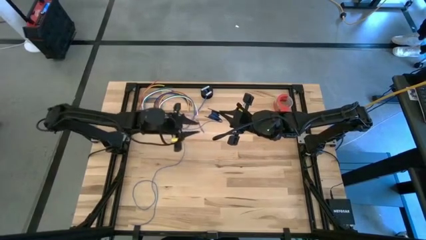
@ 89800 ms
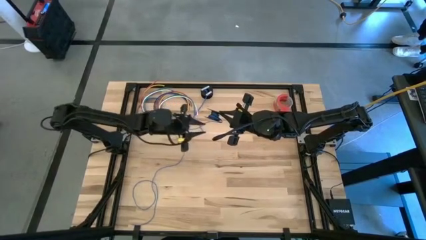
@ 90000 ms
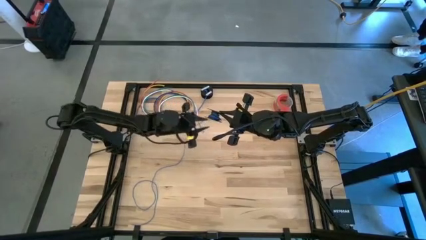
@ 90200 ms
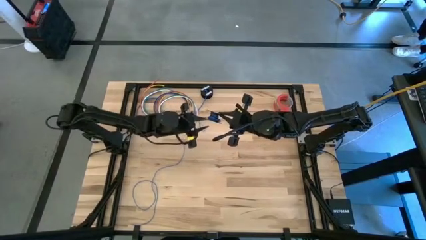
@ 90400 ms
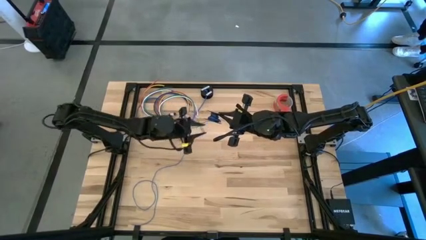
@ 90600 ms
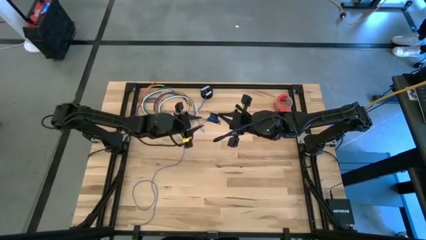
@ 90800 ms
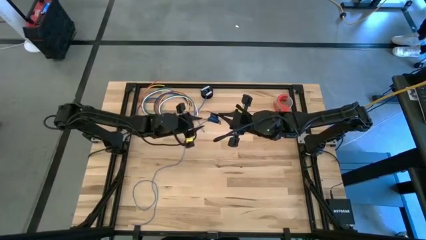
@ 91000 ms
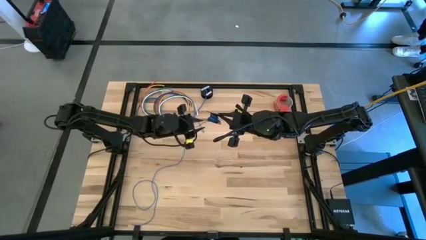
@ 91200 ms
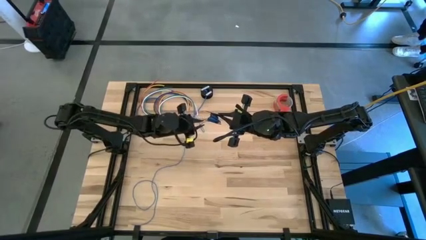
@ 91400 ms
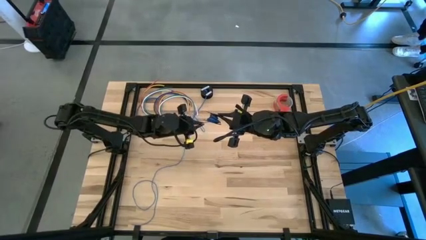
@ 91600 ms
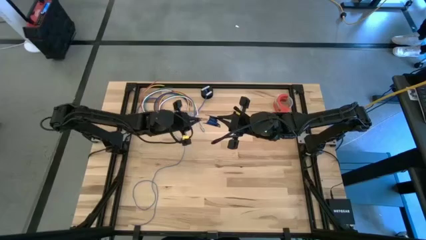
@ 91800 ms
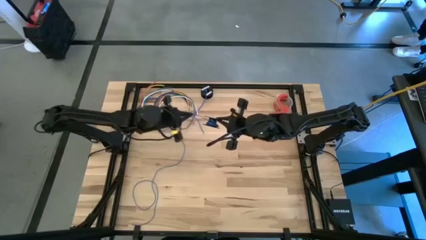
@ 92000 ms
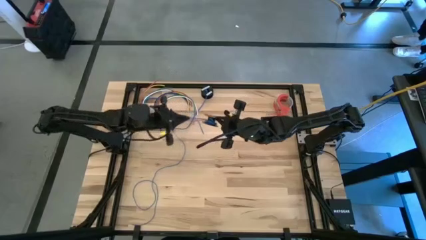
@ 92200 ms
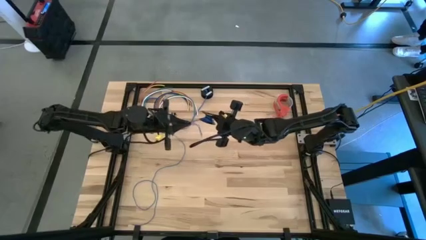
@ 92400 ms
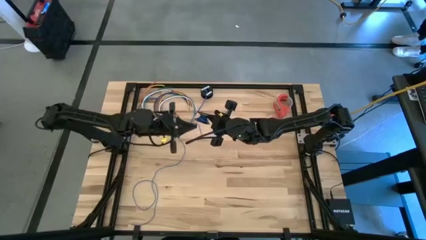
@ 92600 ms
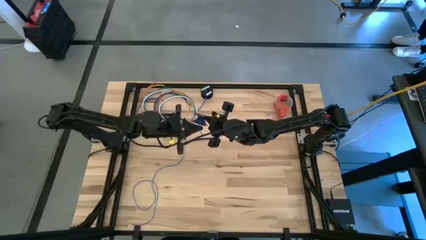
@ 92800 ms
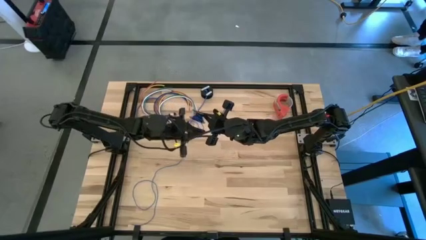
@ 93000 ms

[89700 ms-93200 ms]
Task: Coil cords
Coil the blue wire onto the spool

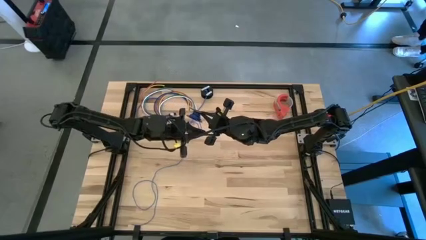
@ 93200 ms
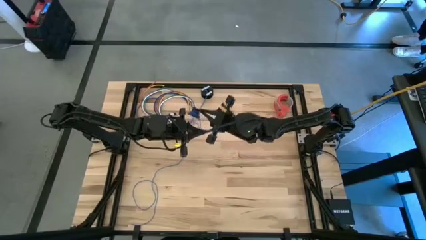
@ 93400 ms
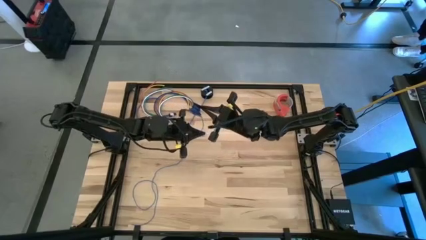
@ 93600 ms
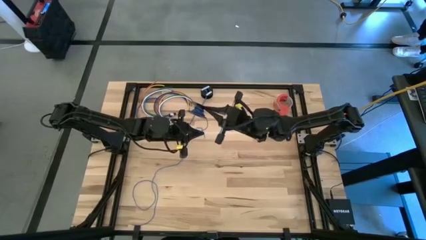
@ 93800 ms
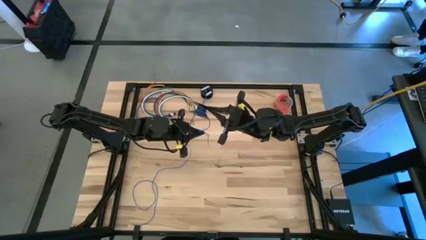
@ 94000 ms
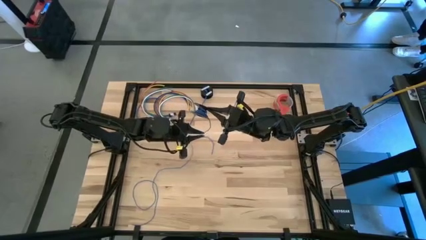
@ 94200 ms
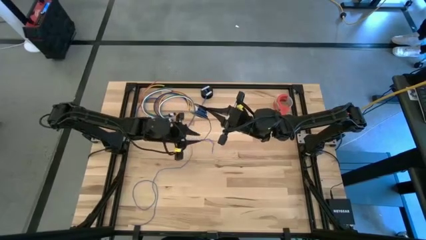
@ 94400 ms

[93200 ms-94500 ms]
Coil the blue wire onto the spool

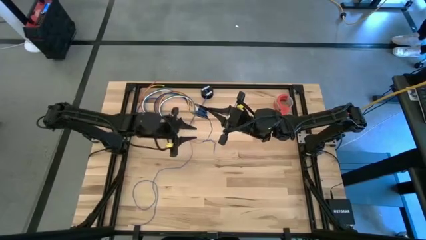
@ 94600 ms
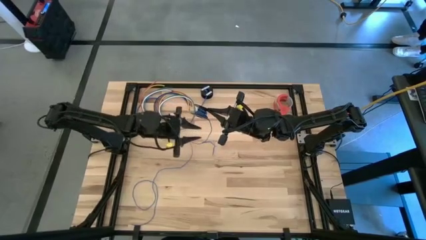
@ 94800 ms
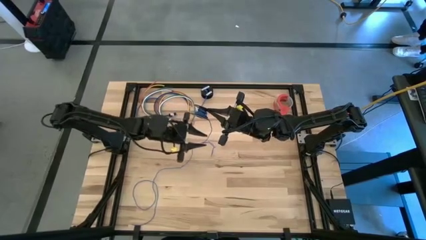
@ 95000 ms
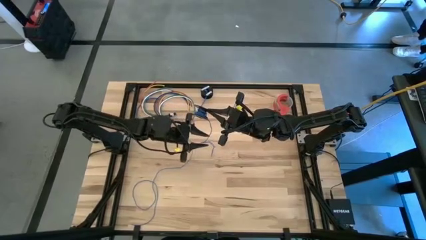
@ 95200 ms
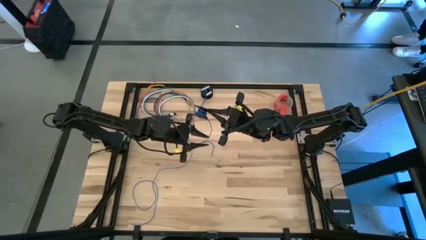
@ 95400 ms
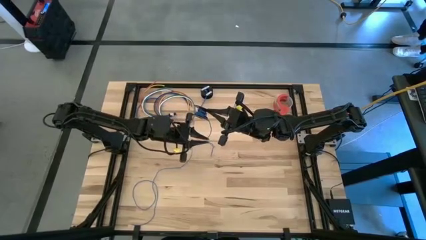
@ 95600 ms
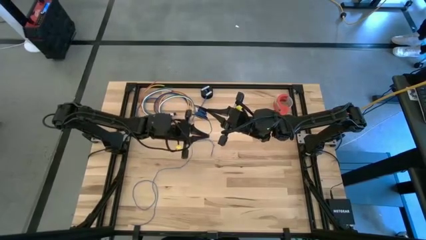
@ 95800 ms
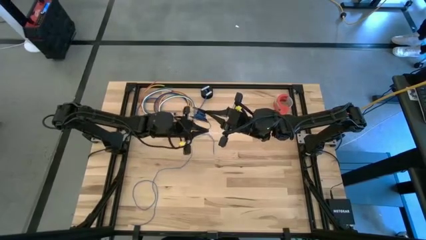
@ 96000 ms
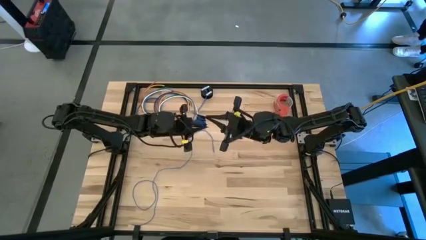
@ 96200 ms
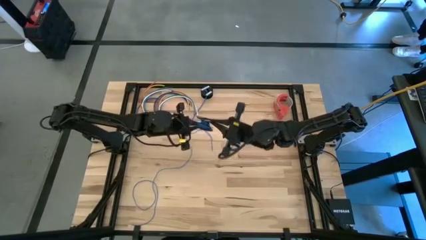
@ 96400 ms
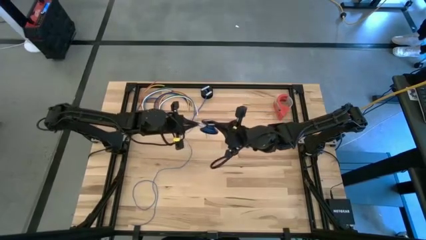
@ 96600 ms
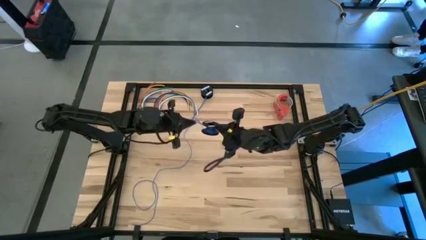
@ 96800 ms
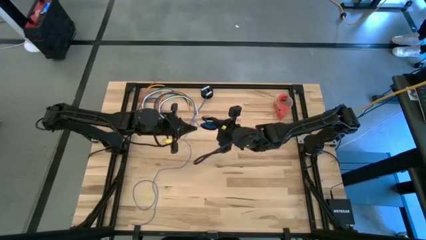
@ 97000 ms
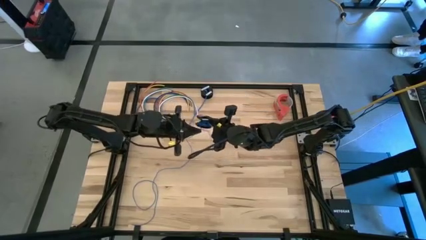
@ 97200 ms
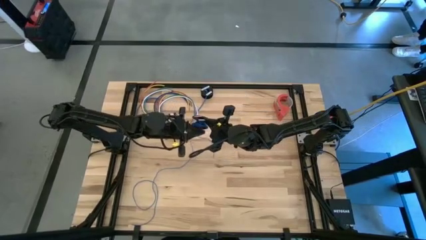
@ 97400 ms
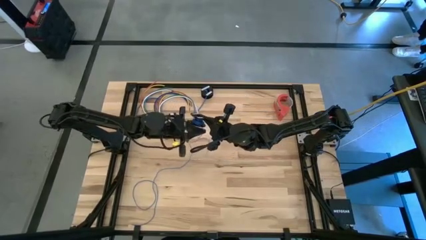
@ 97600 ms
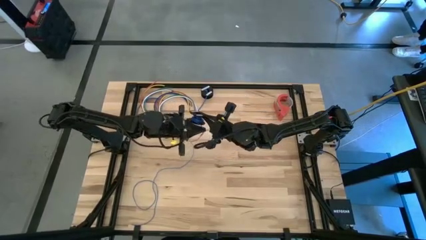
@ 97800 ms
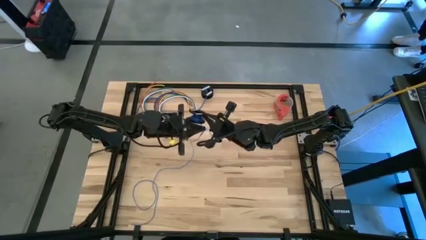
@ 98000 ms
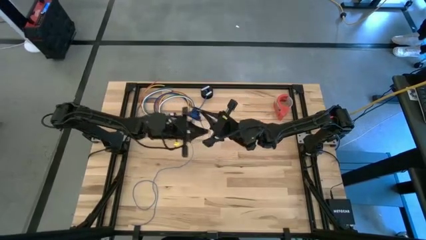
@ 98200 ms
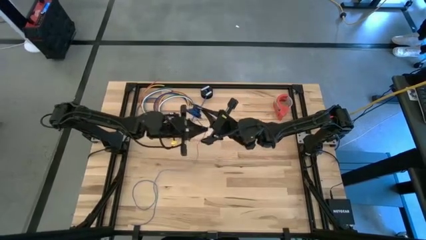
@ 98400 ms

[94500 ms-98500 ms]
Coil the blue wire onto the spool

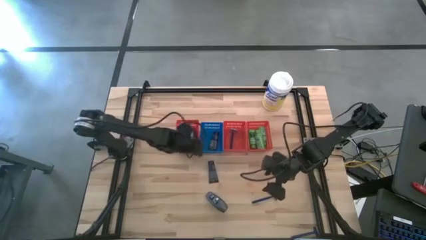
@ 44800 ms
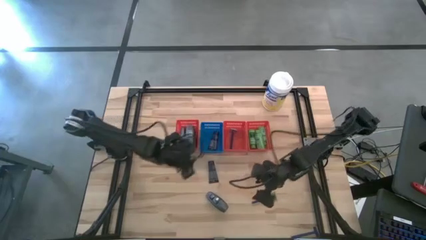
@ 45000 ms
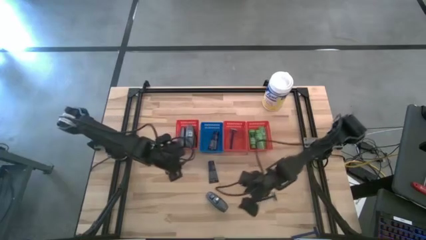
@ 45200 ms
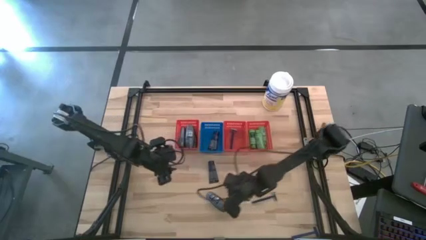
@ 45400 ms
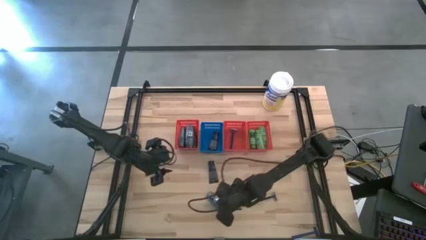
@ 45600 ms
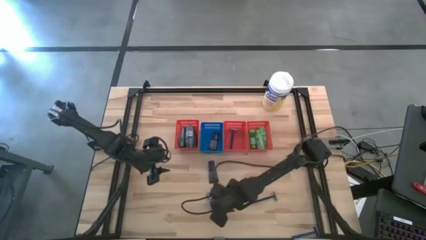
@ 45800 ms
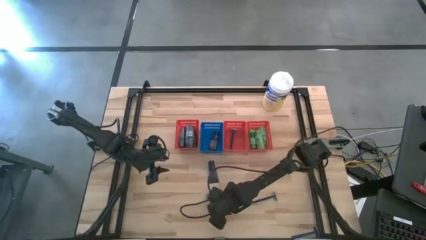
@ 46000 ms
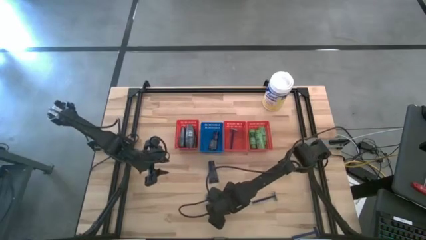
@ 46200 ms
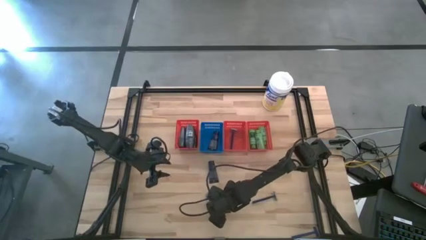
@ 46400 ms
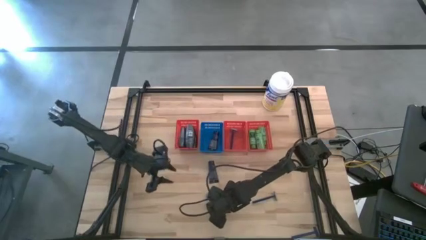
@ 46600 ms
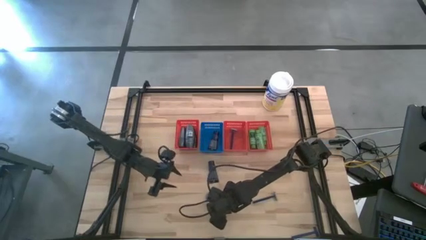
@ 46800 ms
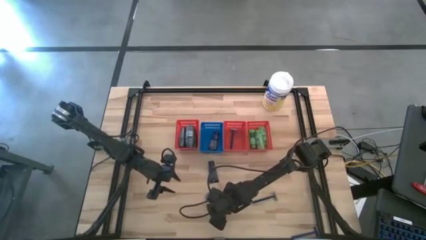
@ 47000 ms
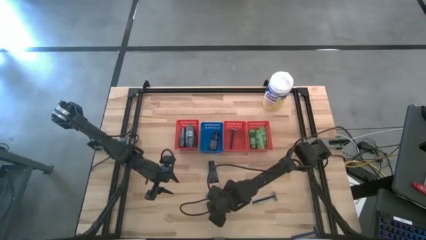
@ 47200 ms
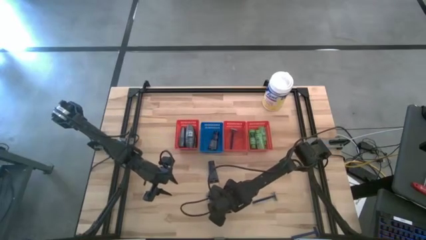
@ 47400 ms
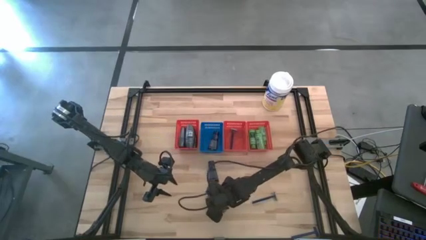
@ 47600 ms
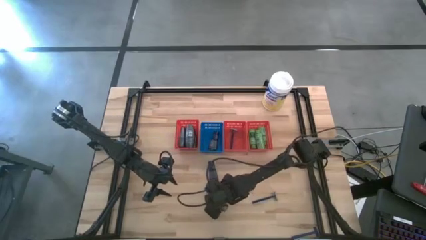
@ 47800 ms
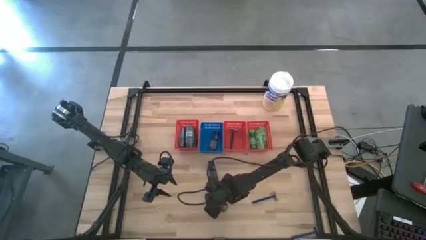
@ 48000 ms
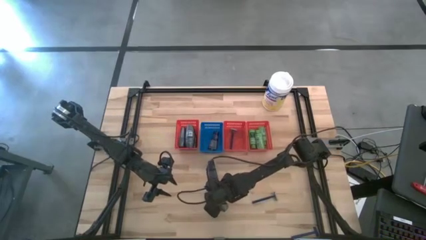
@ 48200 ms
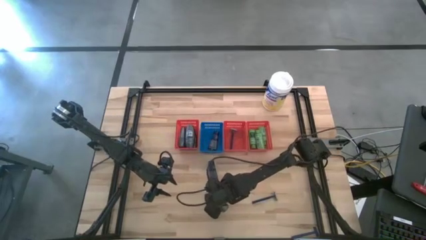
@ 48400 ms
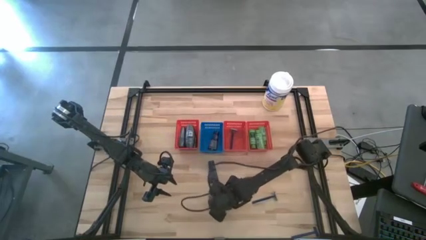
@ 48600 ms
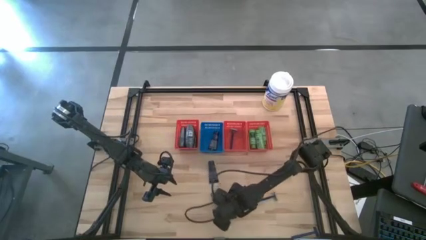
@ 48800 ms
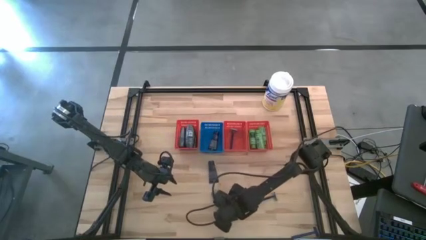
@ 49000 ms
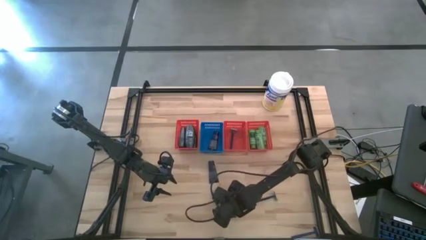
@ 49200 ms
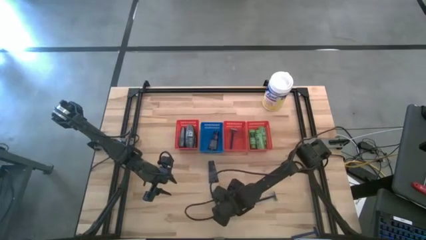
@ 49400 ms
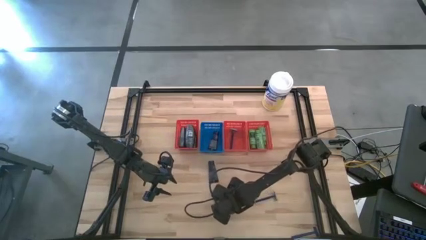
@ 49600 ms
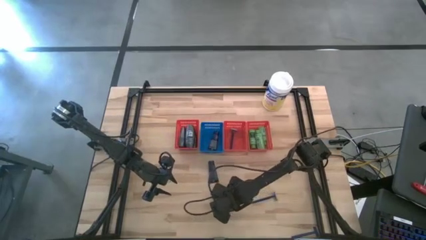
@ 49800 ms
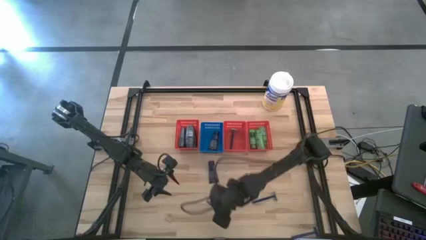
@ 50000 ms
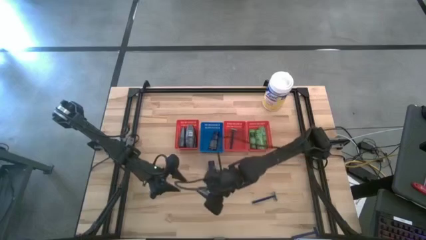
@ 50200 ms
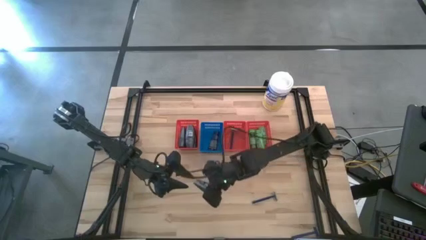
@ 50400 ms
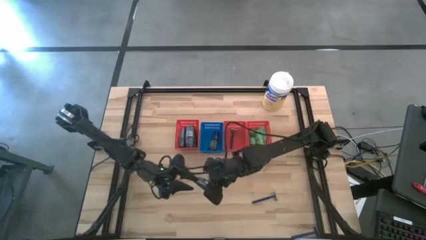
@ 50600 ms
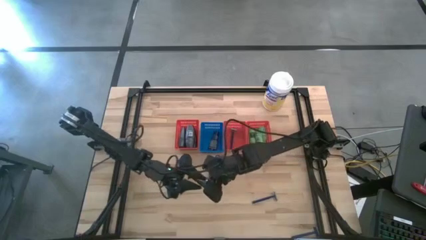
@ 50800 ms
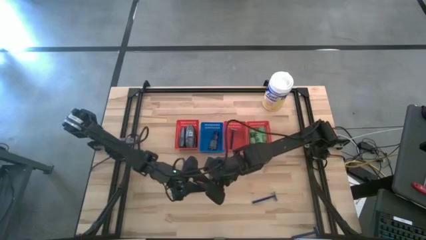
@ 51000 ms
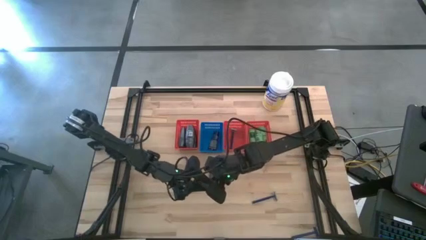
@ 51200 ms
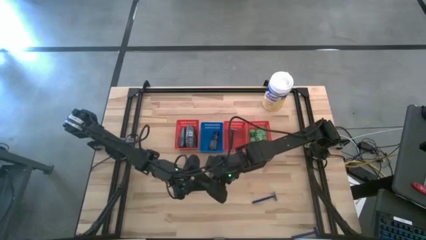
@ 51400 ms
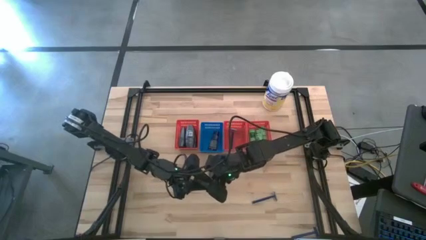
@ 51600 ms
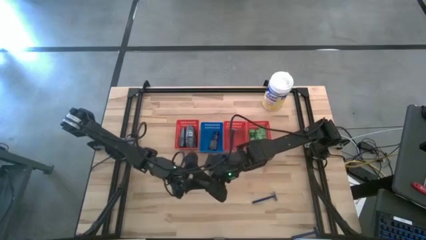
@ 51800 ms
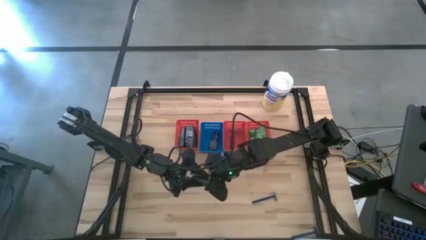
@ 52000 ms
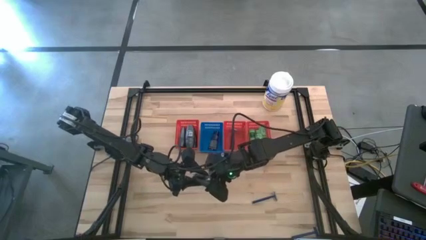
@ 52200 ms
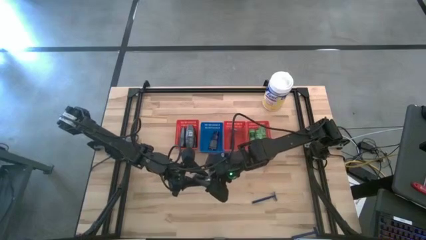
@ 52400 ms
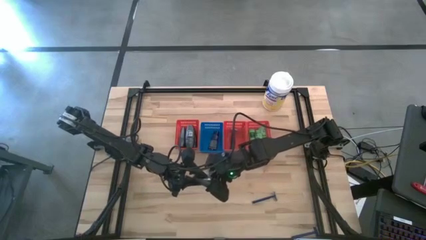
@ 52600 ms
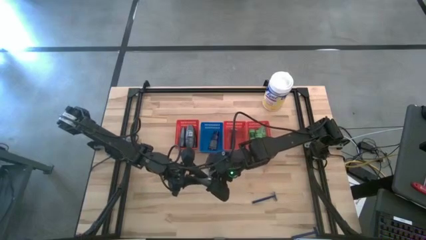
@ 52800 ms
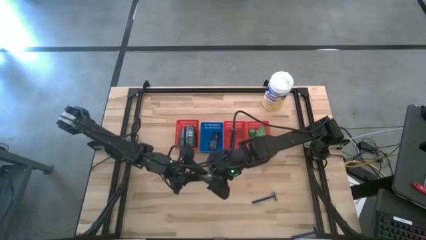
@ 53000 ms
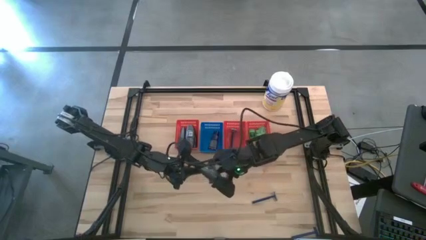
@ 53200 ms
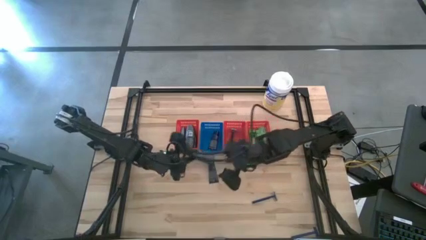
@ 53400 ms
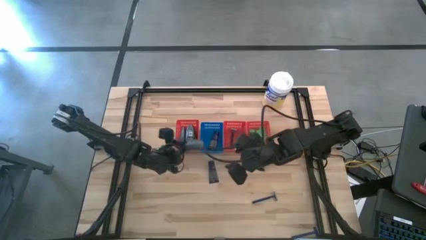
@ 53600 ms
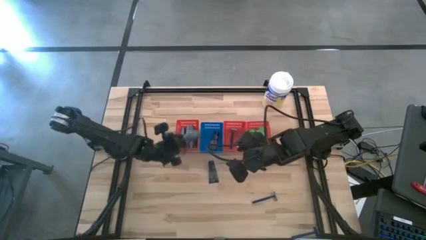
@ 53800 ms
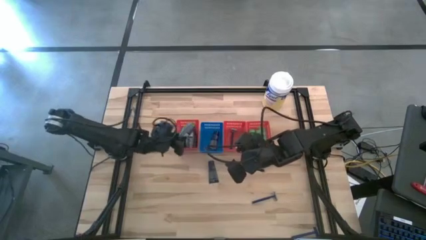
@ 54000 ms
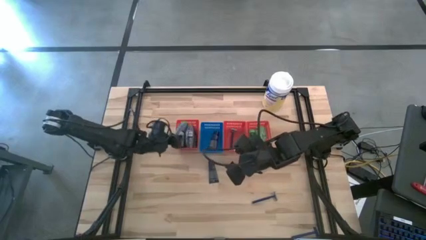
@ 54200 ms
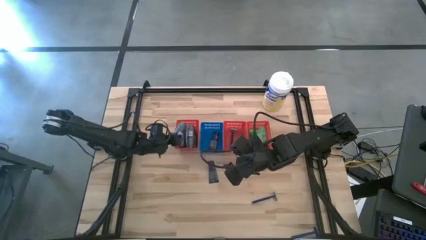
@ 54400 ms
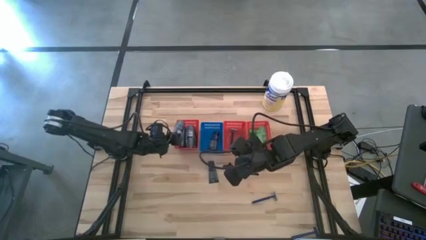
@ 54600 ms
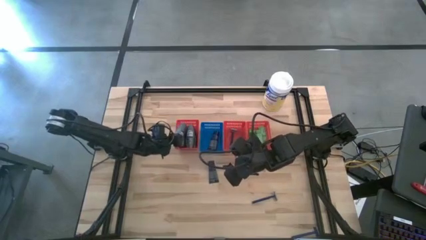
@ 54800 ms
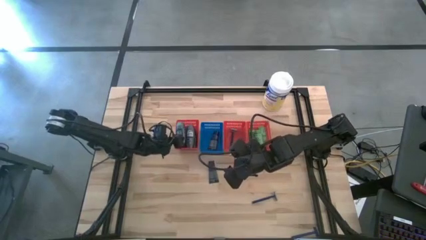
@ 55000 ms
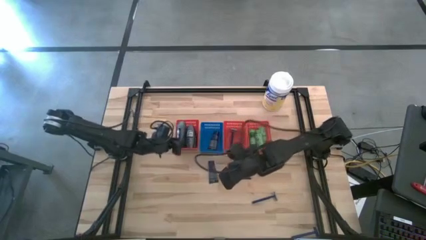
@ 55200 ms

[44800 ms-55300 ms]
Task: Pick & Place Travel size toiletries
Put the black deodorant into the left red basket
